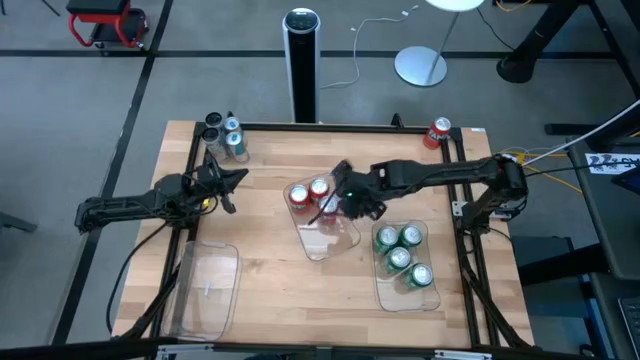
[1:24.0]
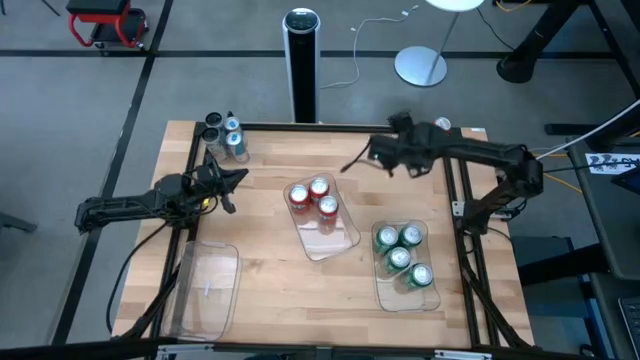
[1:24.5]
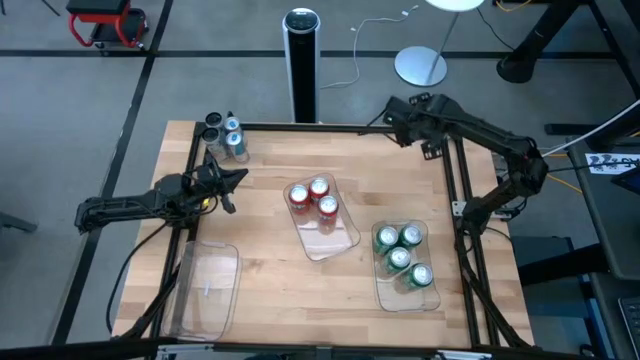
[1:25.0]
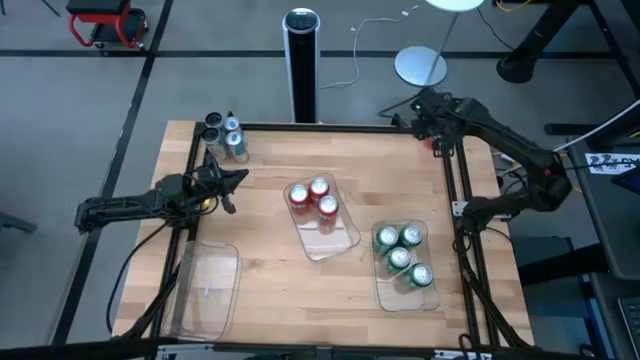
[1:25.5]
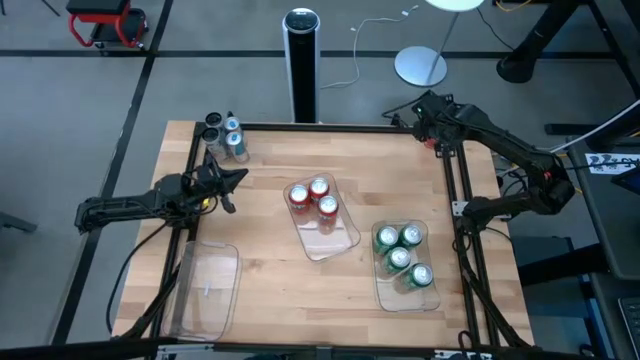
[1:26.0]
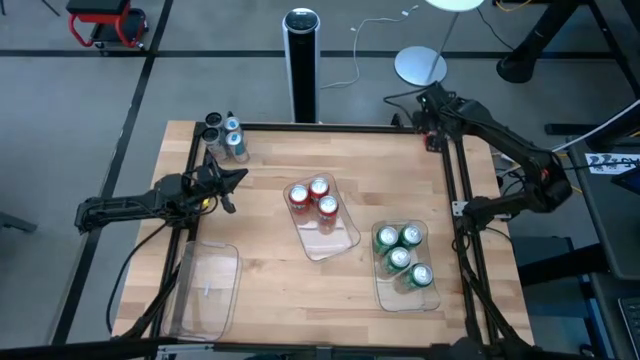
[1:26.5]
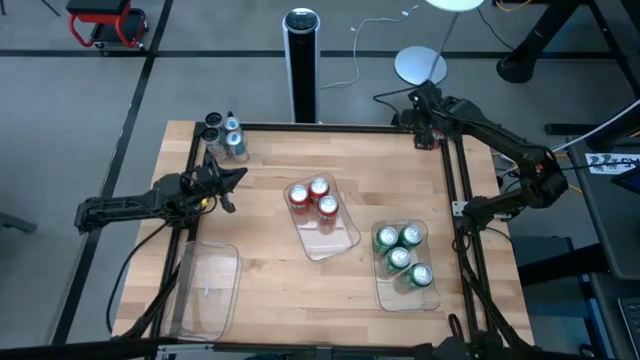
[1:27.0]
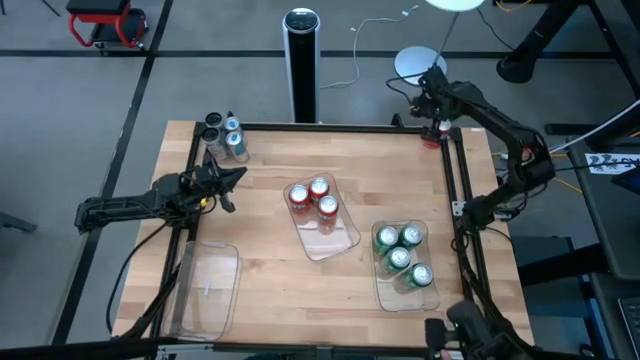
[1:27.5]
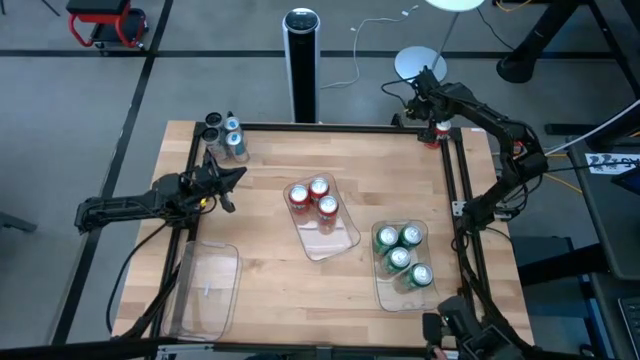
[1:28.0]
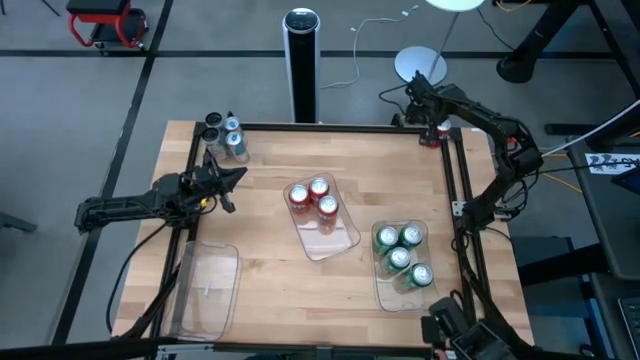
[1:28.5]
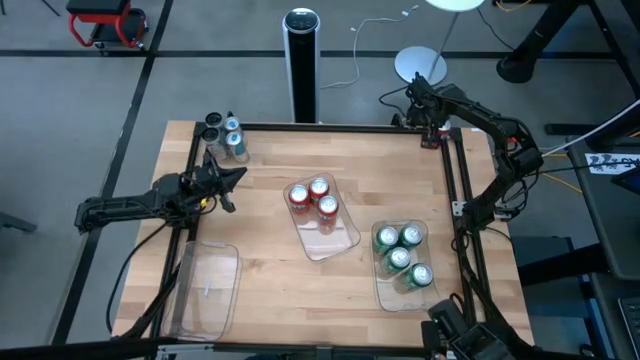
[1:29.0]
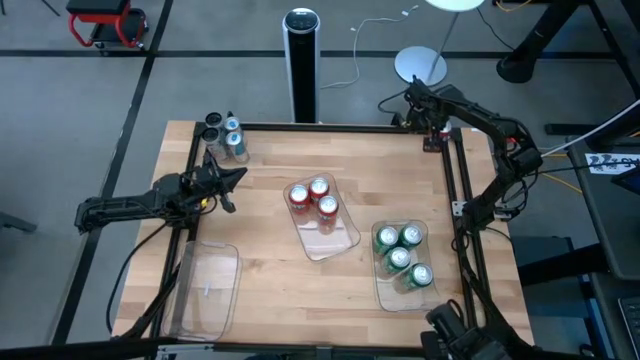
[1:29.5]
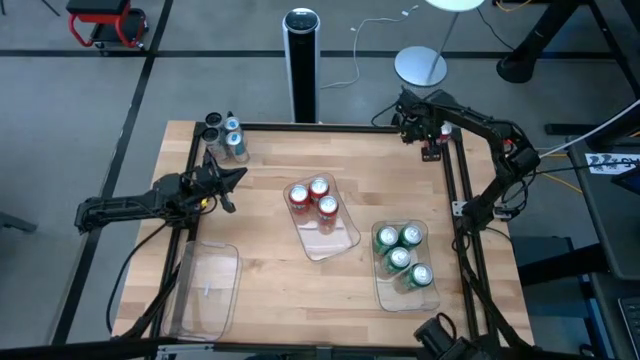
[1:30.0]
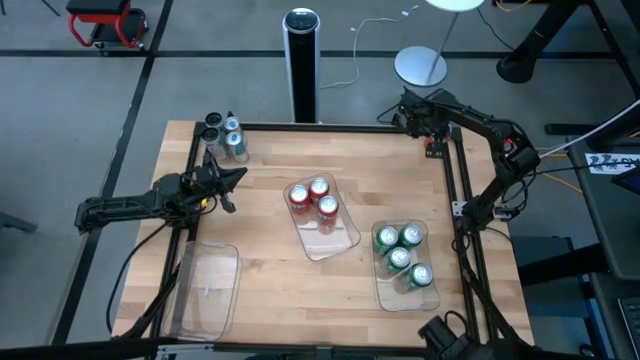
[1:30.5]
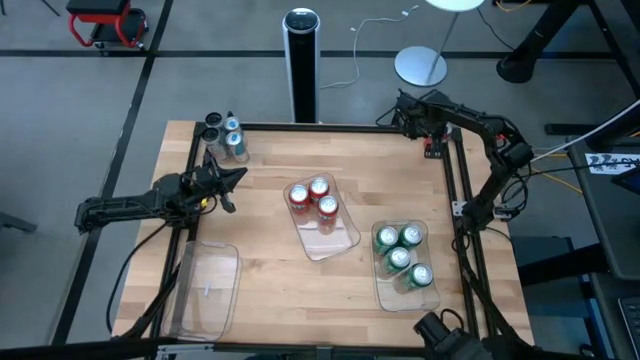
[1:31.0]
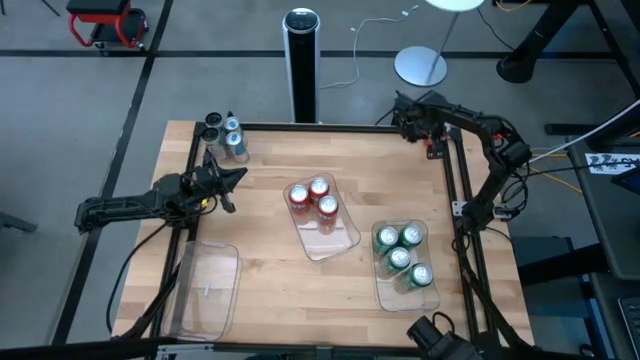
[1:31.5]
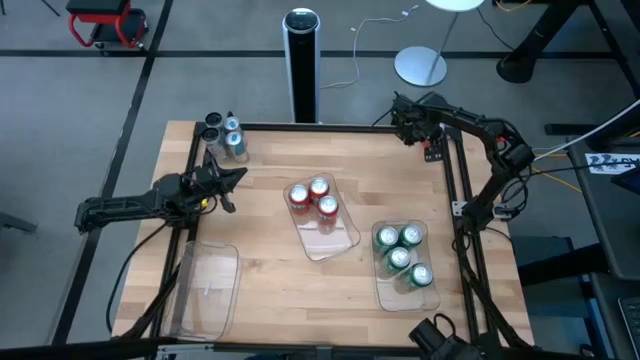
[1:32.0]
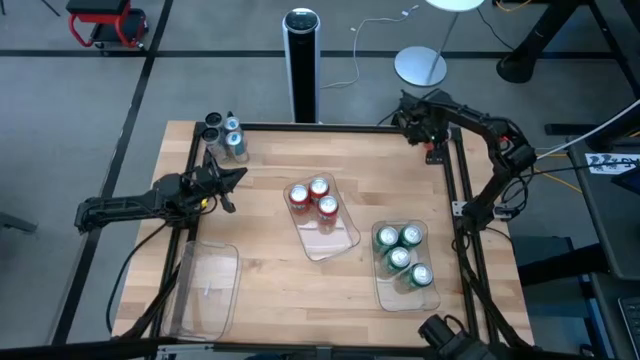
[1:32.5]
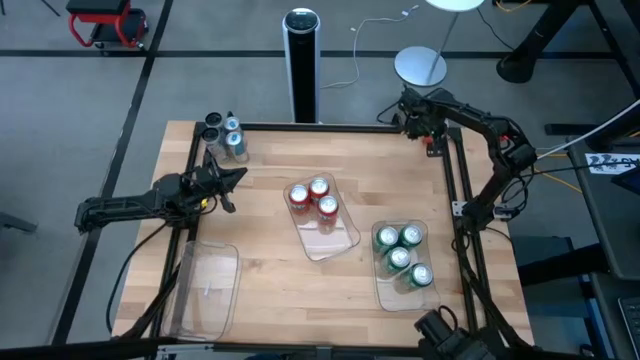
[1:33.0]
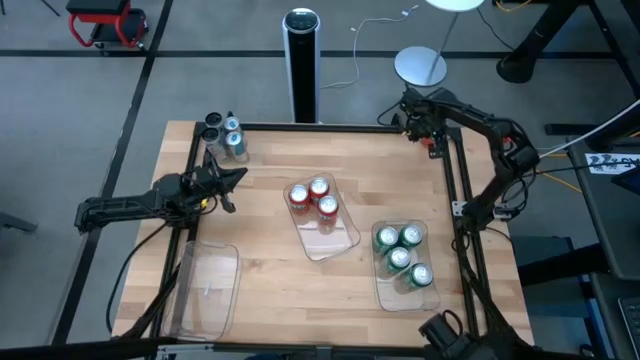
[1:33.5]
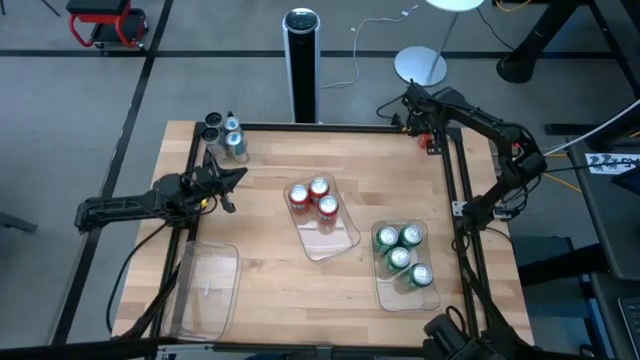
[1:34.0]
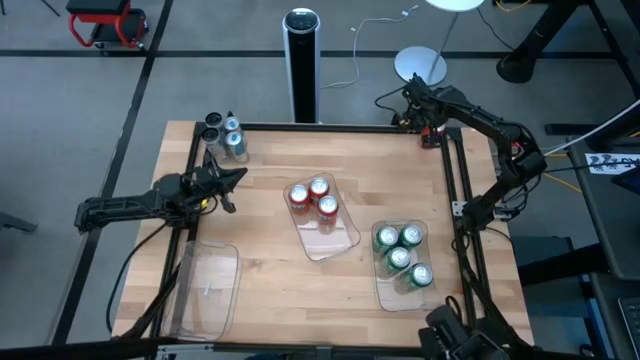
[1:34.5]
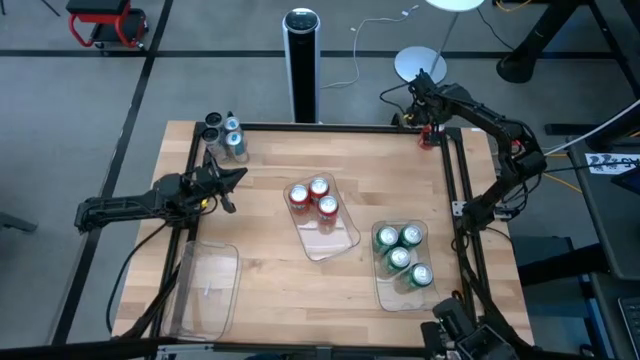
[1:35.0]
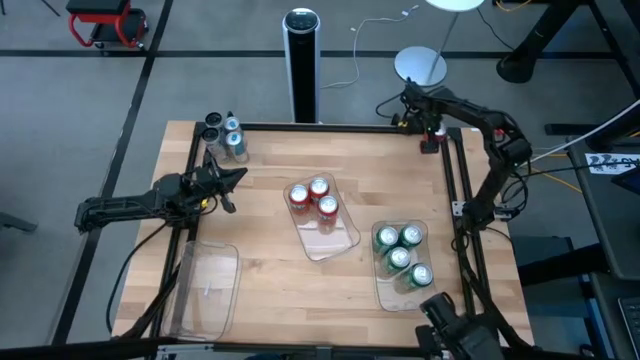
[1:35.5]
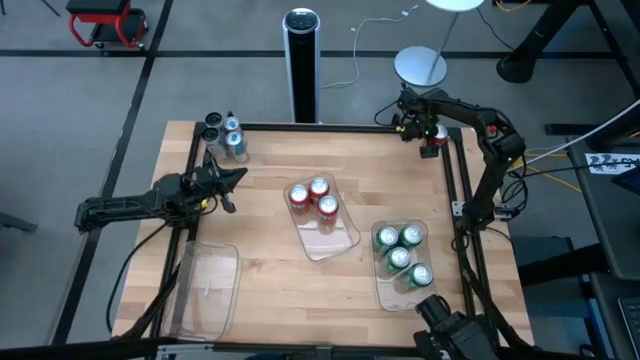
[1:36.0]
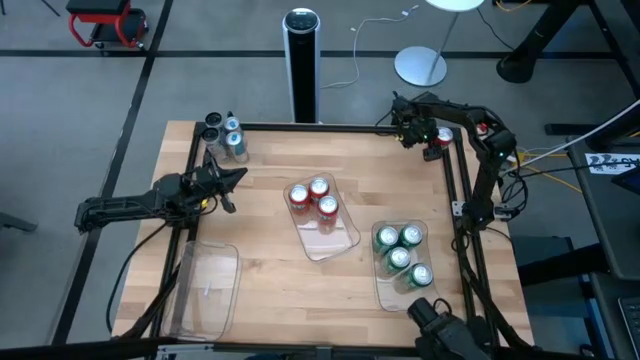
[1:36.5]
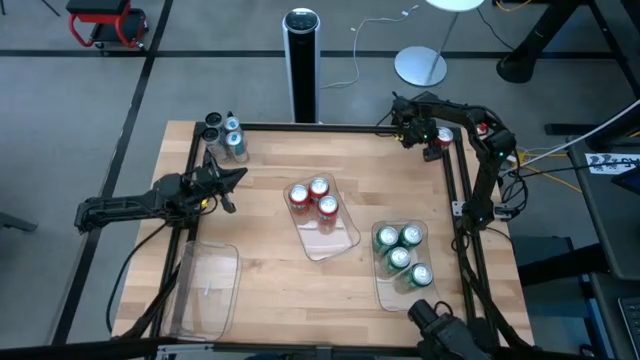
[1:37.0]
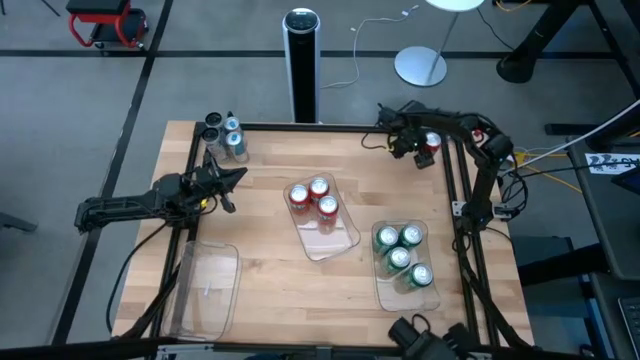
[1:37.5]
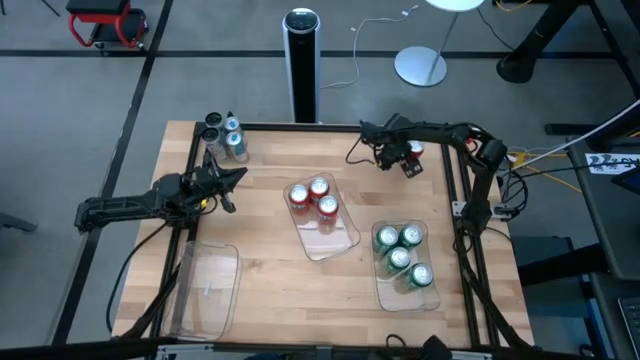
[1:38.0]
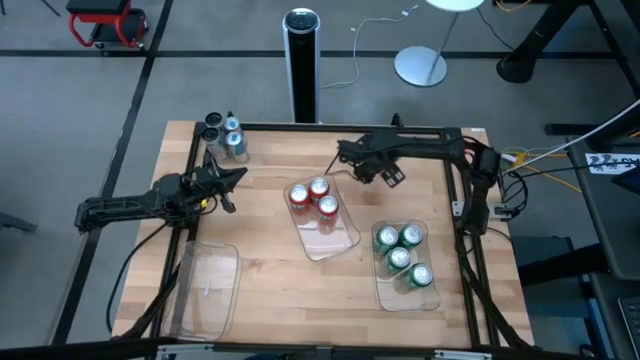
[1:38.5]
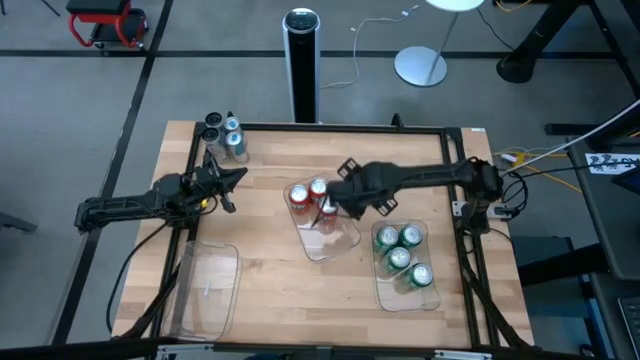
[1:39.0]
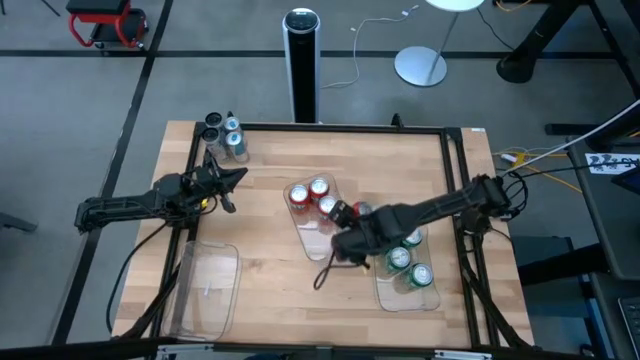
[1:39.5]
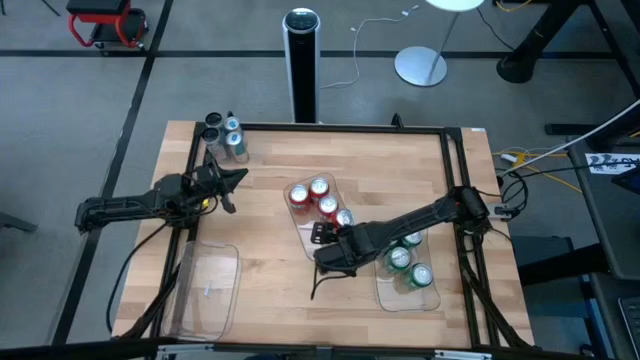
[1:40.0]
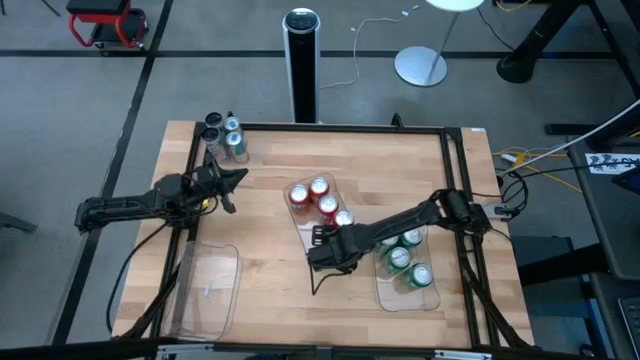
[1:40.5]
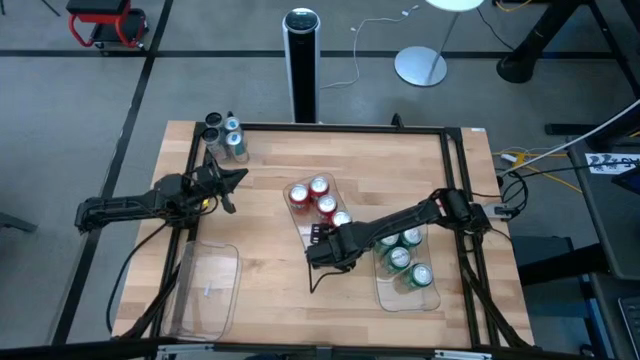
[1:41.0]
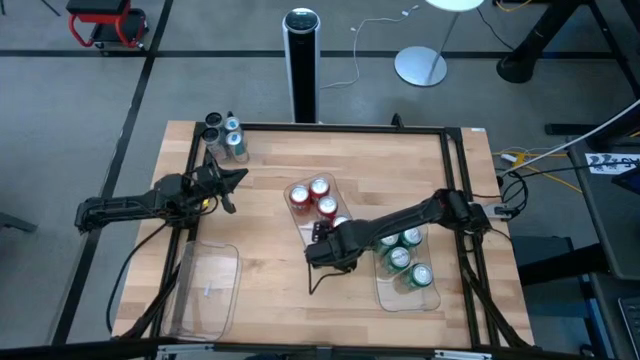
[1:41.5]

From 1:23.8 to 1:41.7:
Task: Sort soda cans
Put the orange soda can into the middle transparent bin
